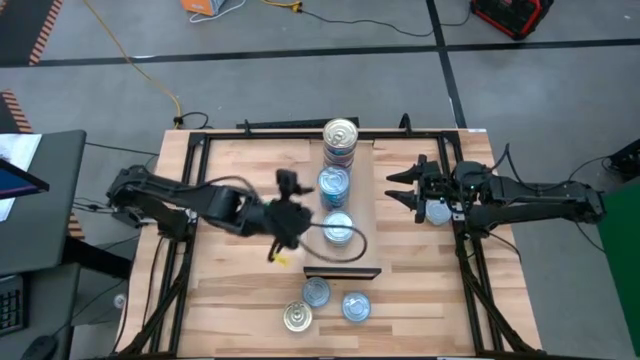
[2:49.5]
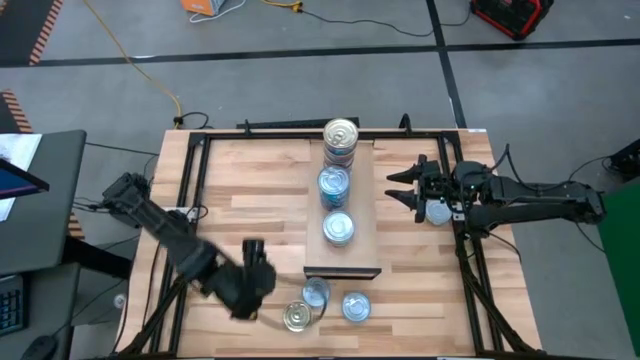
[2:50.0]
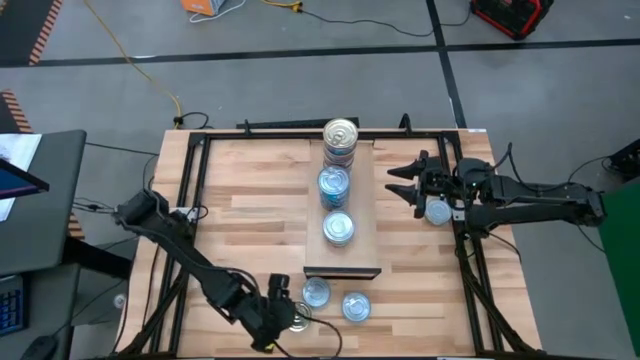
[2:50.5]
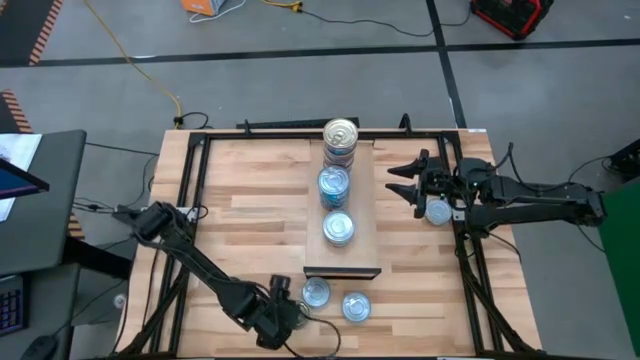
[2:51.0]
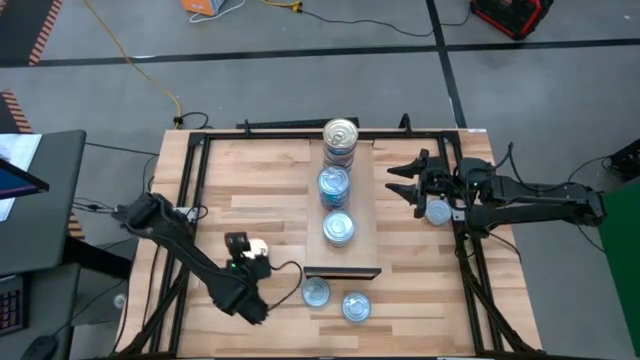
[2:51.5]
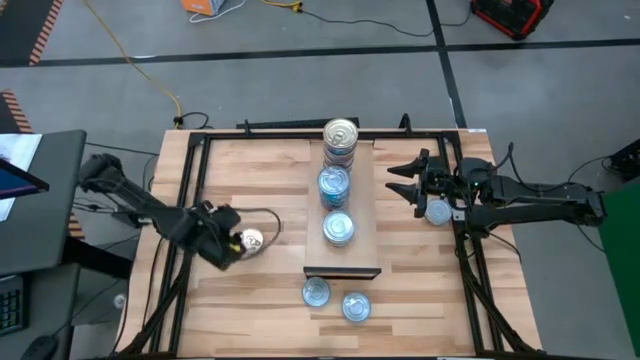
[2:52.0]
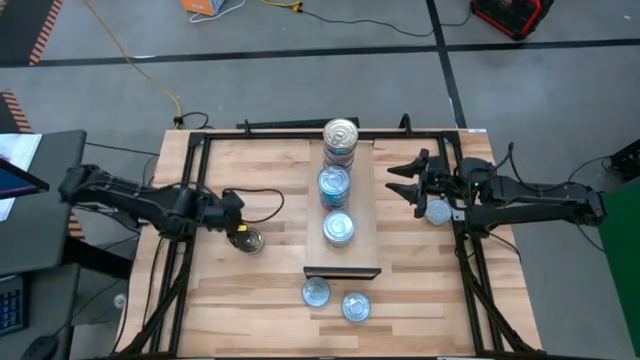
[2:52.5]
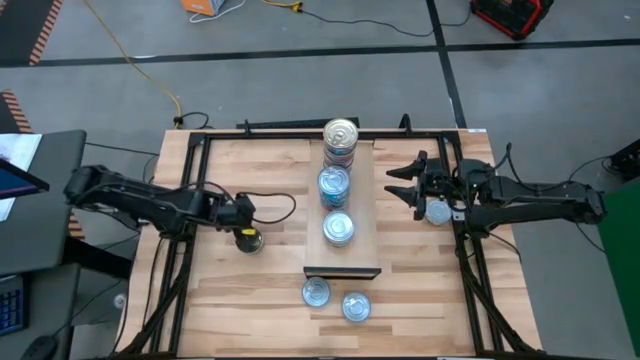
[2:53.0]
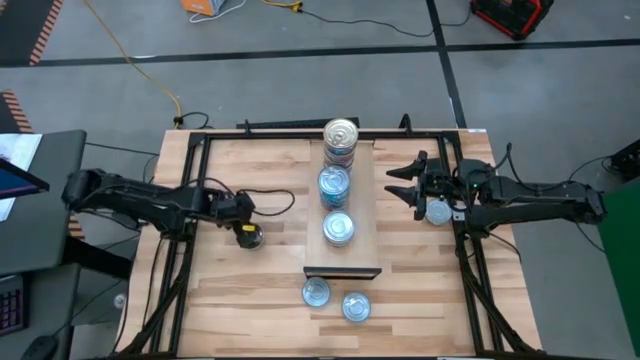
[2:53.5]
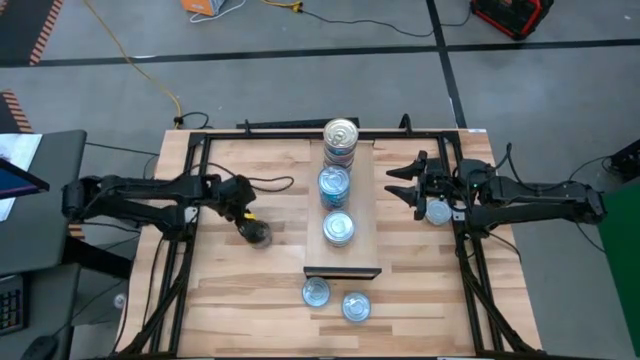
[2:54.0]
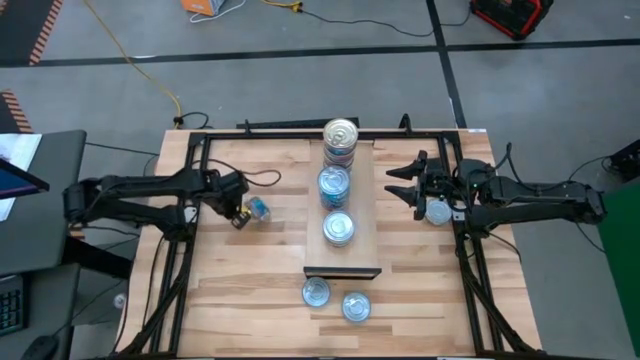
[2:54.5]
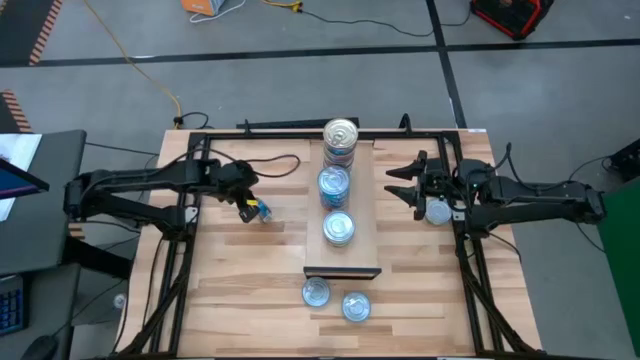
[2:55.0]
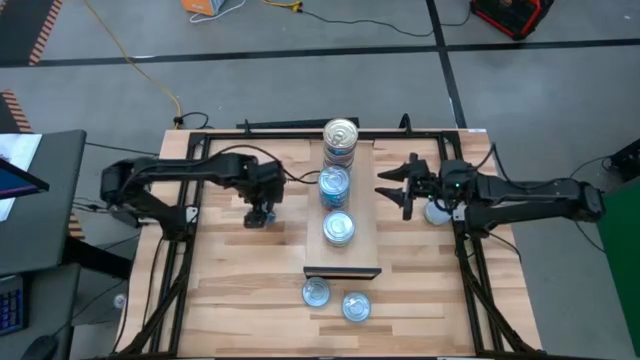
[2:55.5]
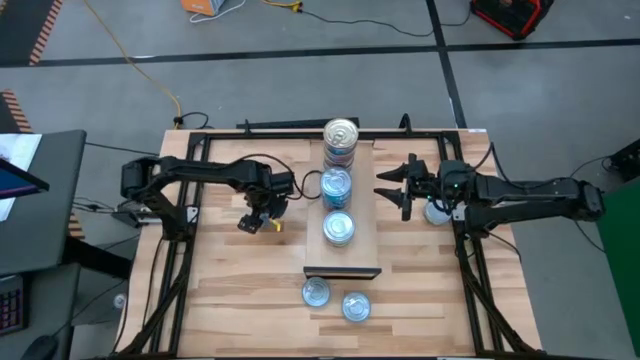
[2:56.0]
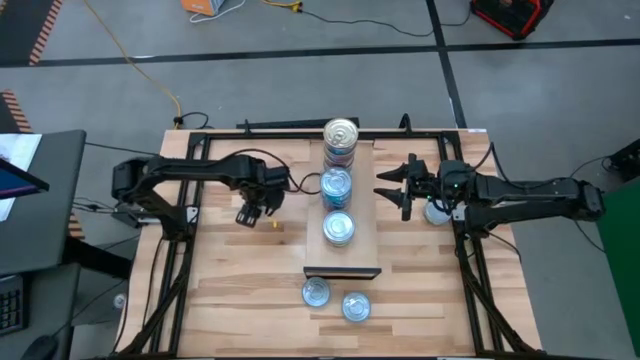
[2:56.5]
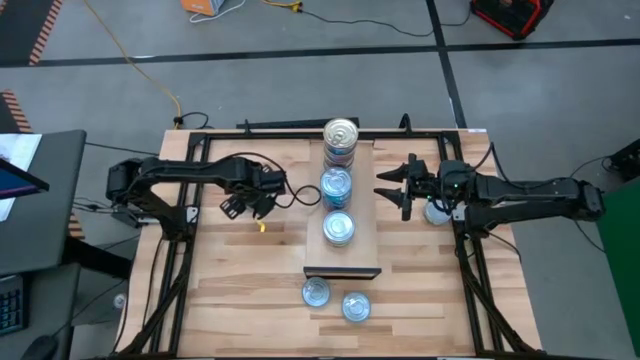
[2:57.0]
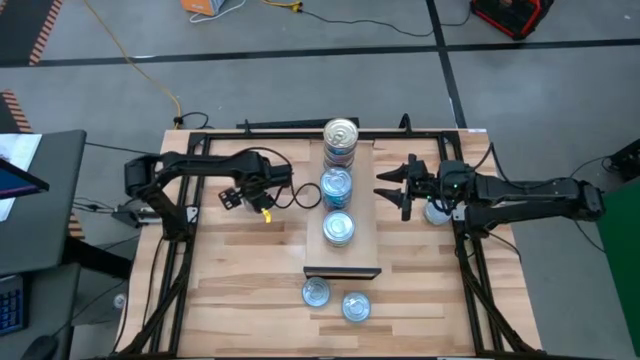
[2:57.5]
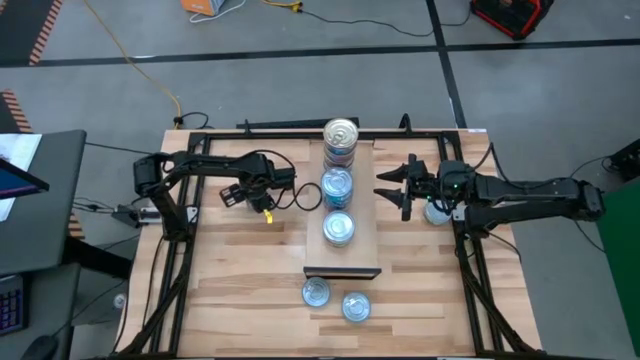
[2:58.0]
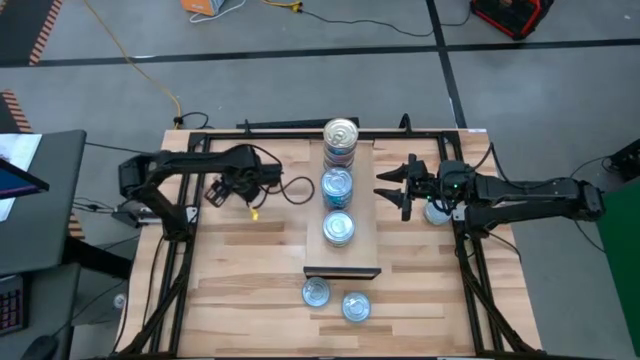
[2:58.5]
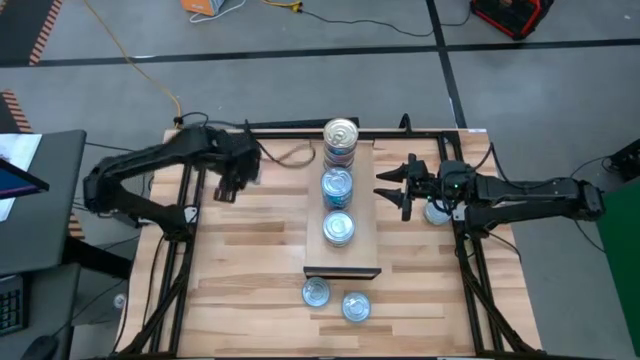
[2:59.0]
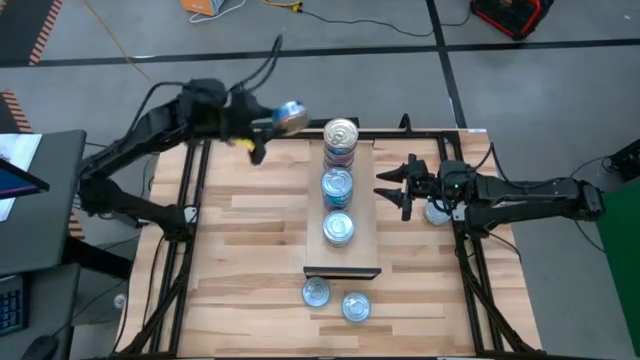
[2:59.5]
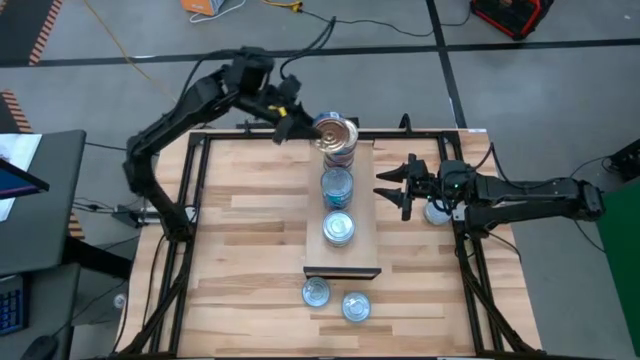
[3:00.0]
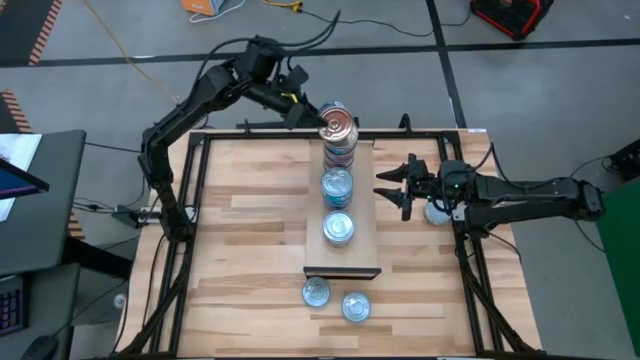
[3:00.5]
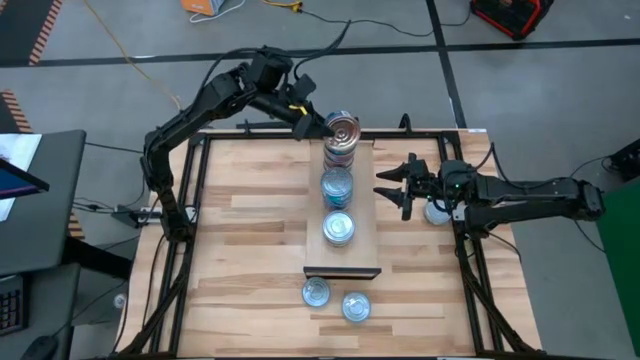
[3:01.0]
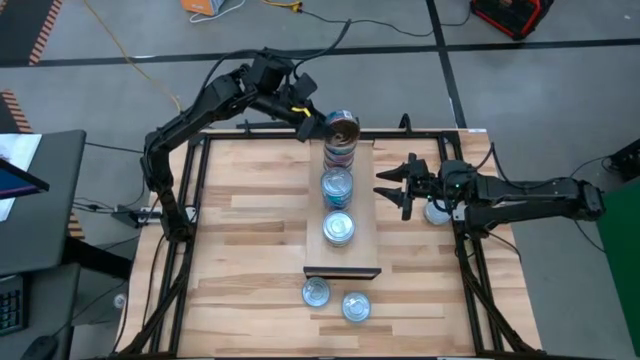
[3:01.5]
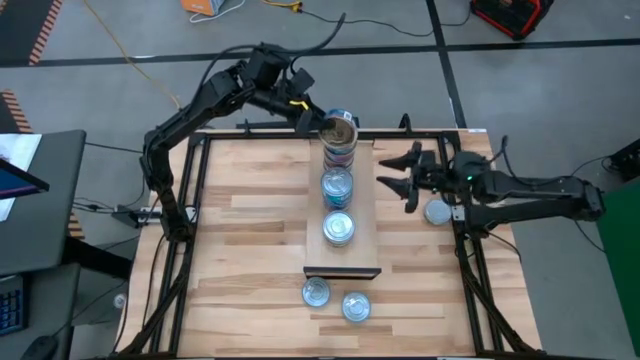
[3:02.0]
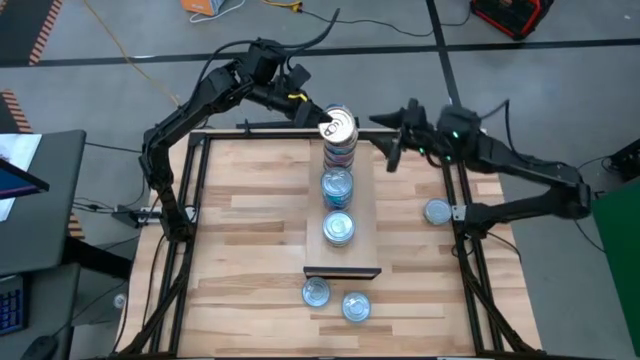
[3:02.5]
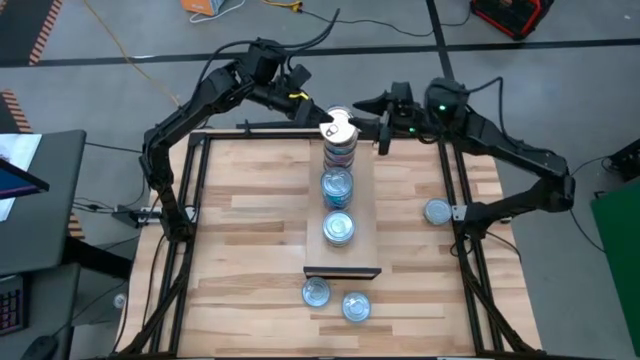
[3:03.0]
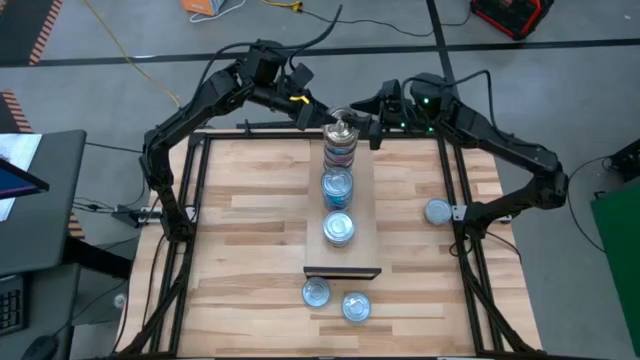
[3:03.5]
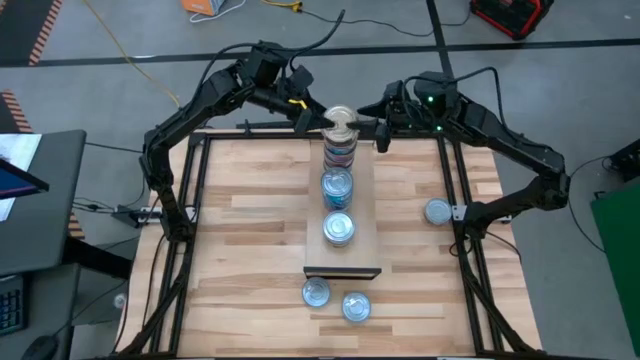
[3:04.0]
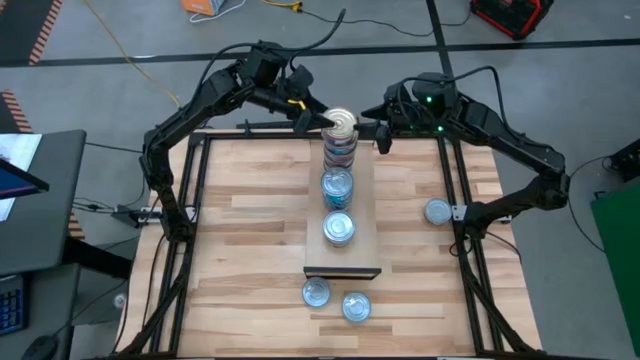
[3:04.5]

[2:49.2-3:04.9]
Task: Stack canned seafood by type on shelf
Stack the blue and pink tuna can on the shelf on top of the other blue and pink tuna can

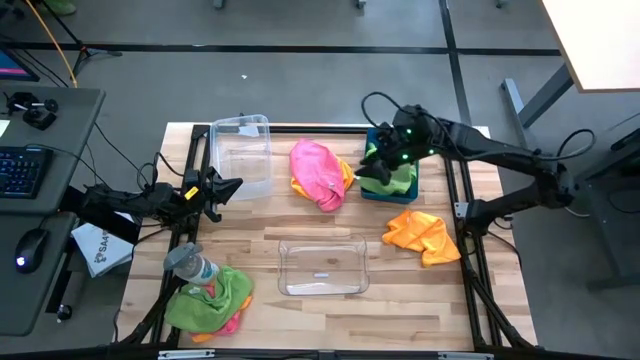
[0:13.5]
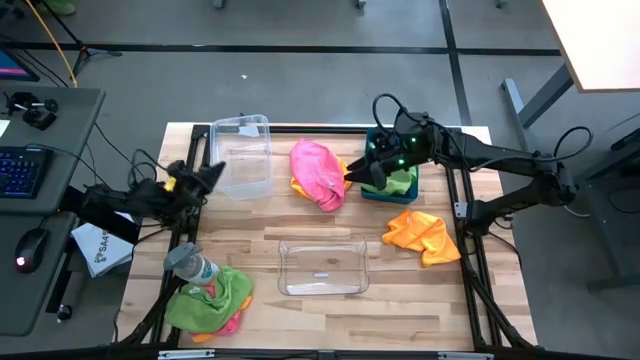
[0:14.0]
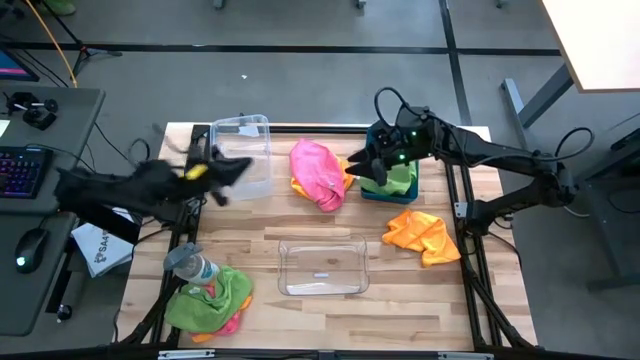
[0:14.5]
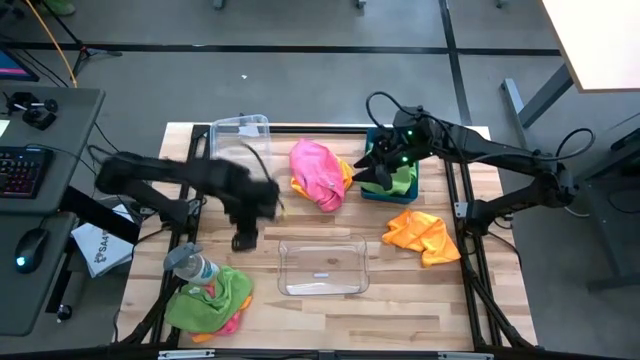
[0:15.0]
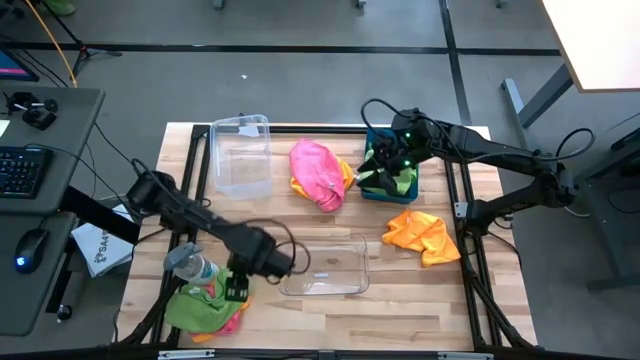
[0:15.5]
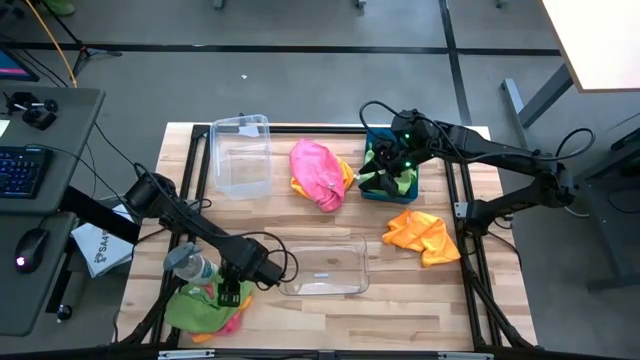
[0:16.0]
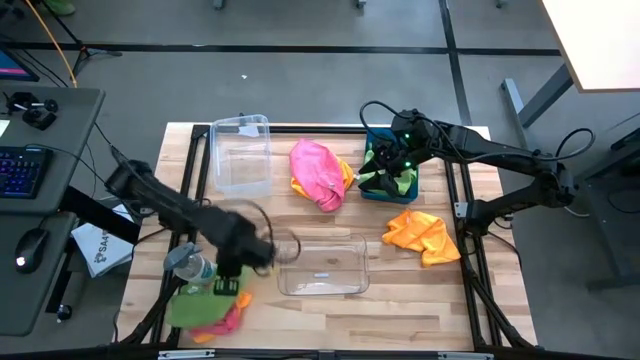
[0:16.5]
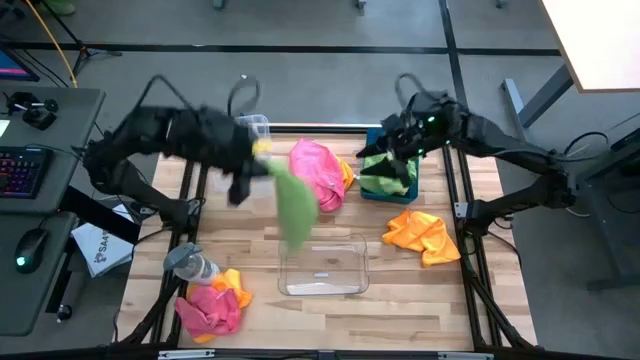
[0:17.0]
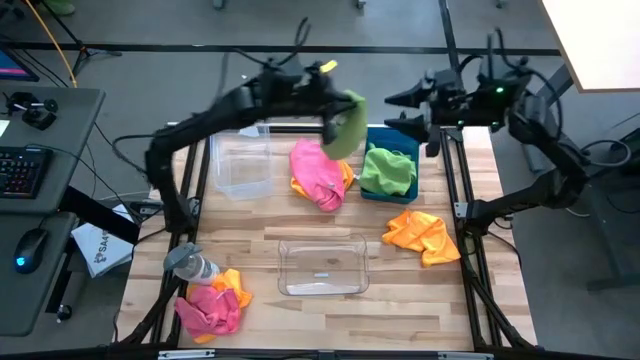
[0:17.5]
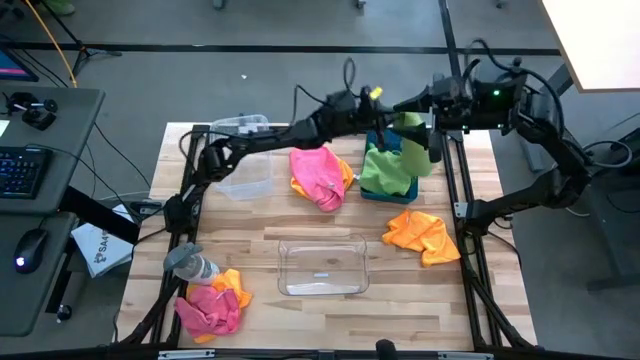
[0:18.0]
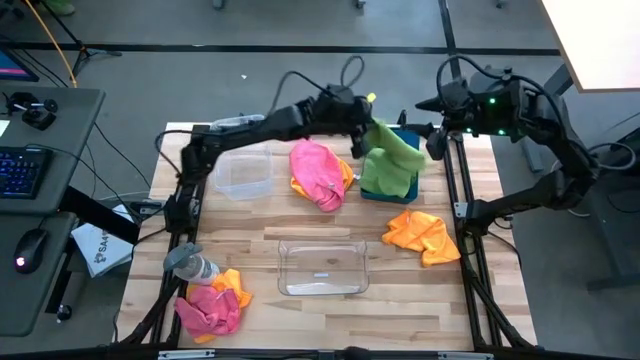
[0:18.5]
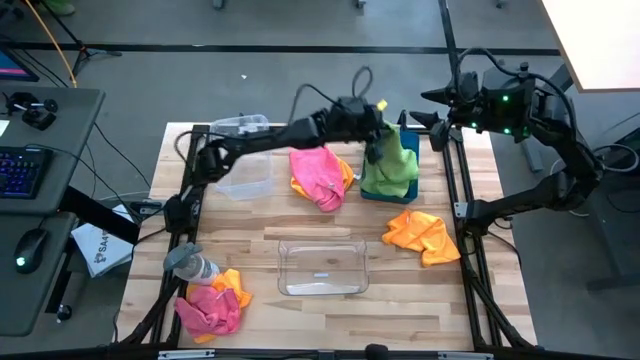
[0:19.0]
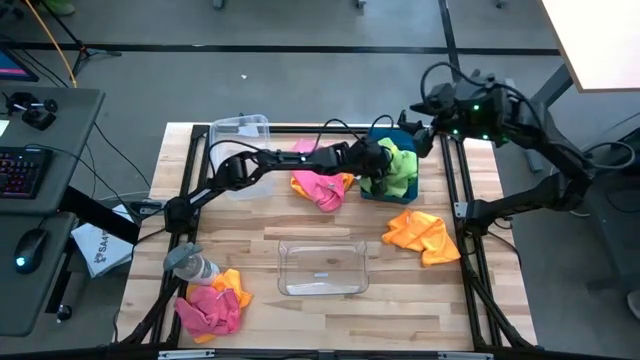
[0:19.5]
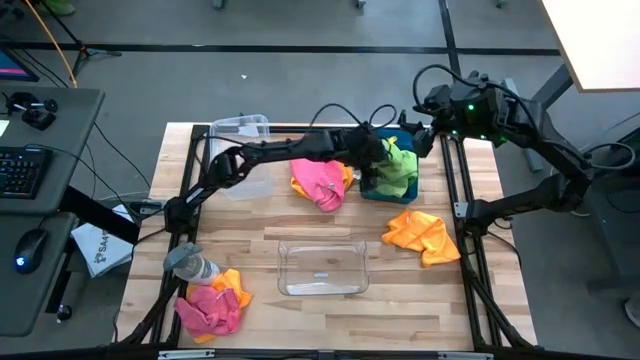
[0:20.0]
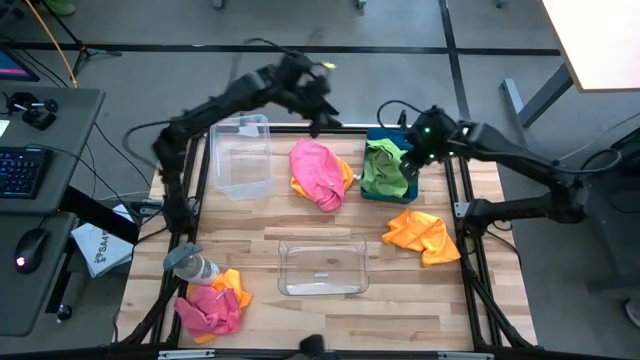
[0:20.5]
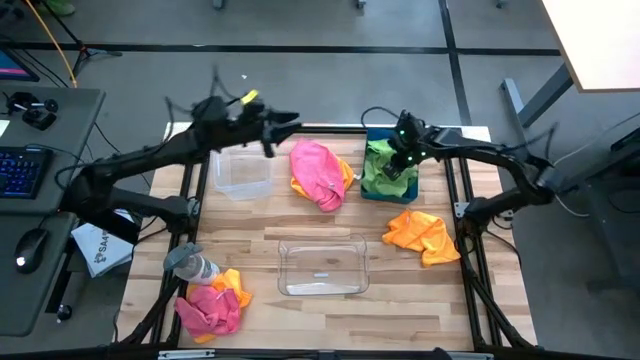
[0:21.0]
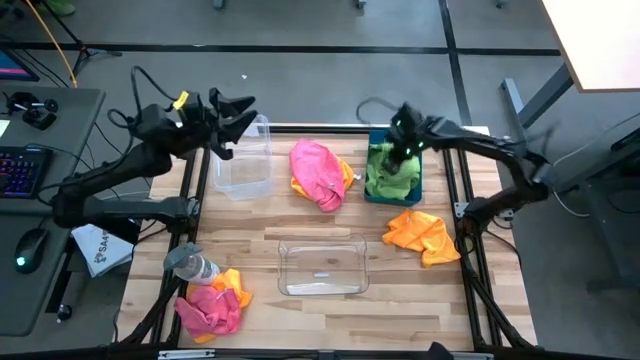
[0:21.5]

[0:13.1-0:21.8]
Task: Sort microfiber towel by color & place in baskets
Put the green microfiber towel into the blue bin
